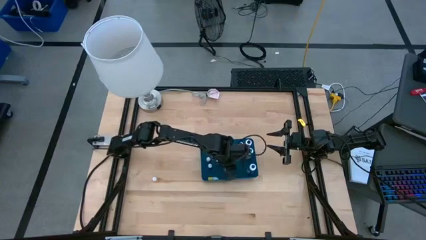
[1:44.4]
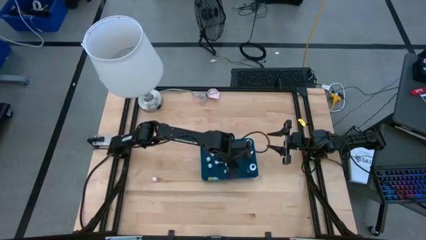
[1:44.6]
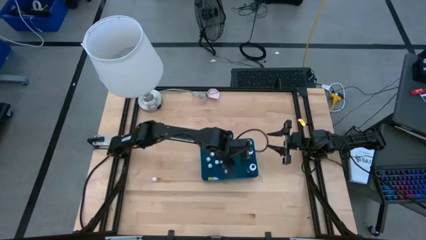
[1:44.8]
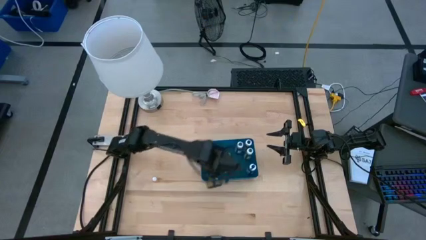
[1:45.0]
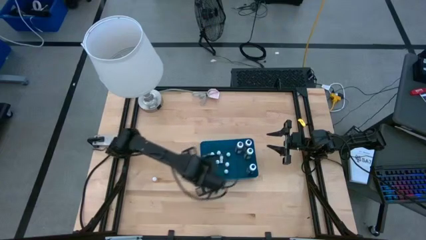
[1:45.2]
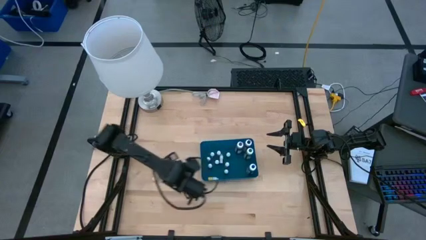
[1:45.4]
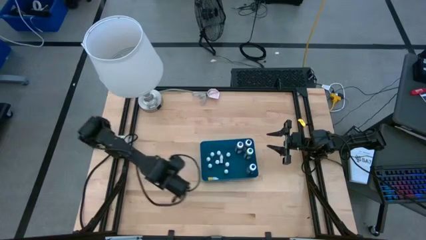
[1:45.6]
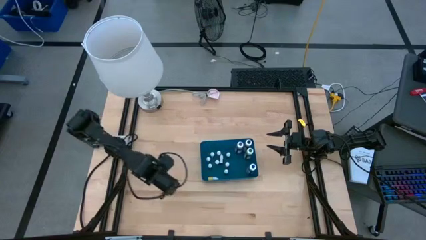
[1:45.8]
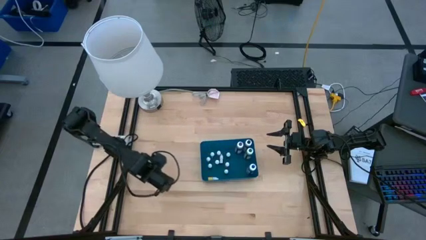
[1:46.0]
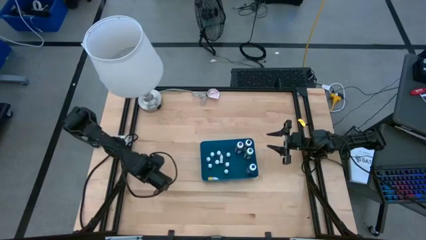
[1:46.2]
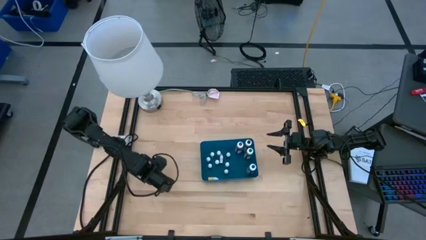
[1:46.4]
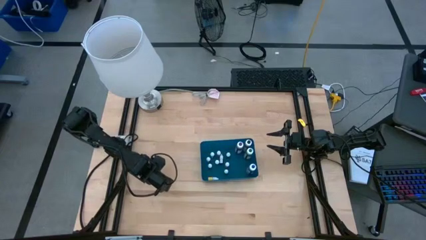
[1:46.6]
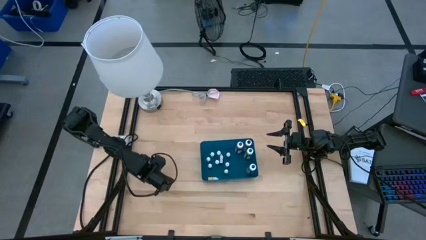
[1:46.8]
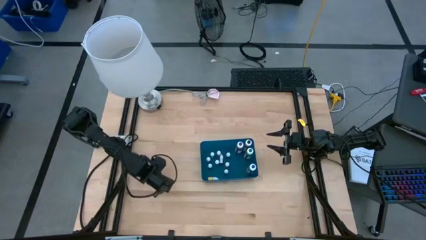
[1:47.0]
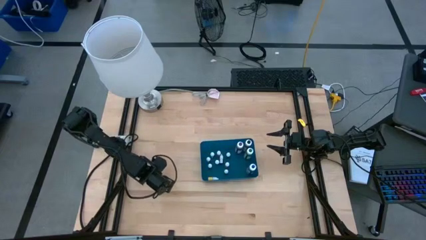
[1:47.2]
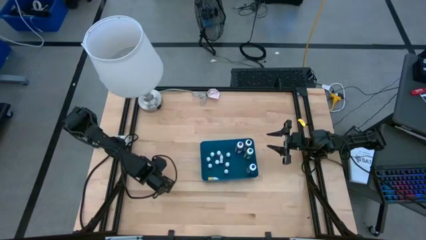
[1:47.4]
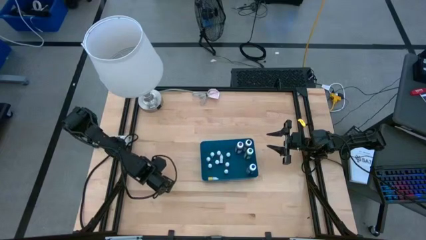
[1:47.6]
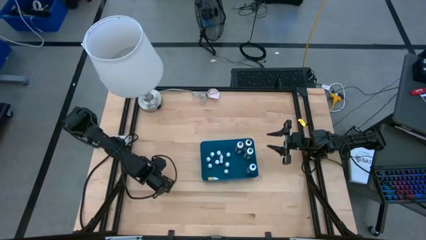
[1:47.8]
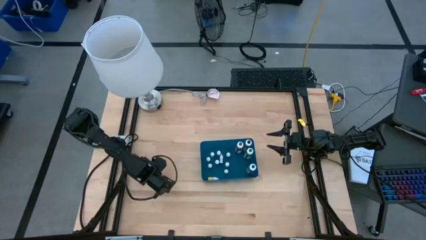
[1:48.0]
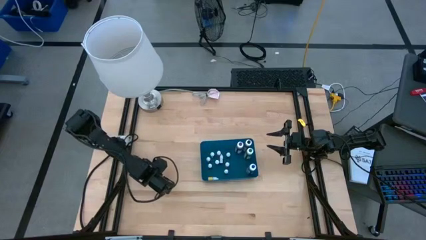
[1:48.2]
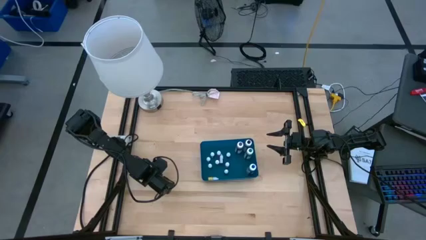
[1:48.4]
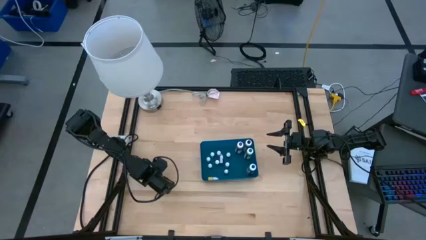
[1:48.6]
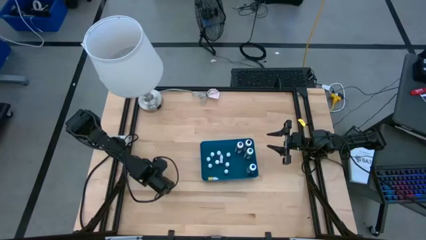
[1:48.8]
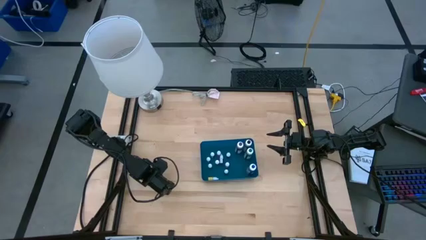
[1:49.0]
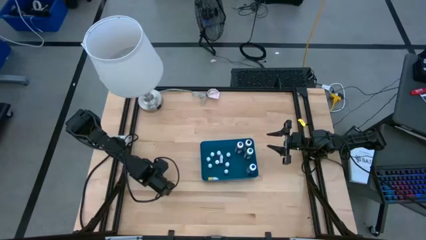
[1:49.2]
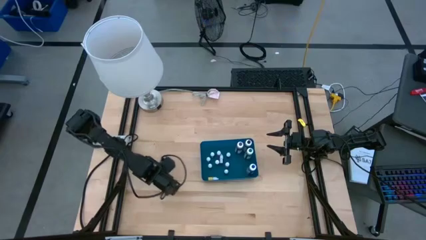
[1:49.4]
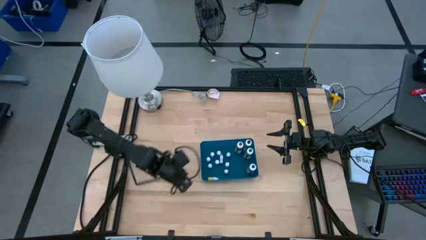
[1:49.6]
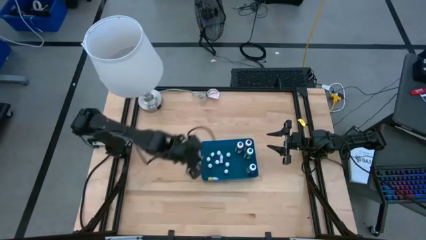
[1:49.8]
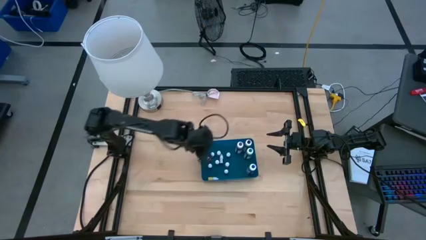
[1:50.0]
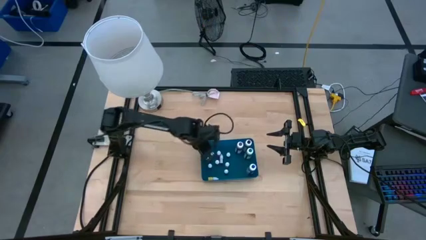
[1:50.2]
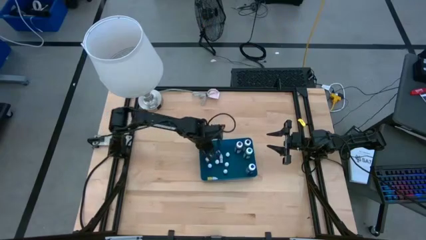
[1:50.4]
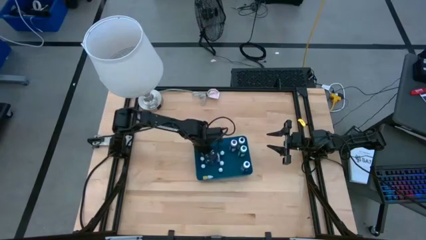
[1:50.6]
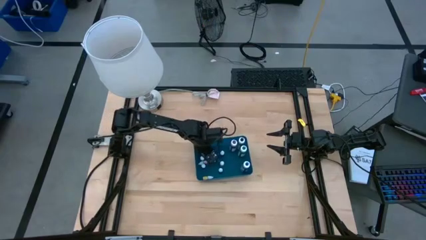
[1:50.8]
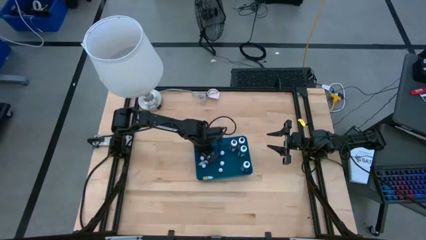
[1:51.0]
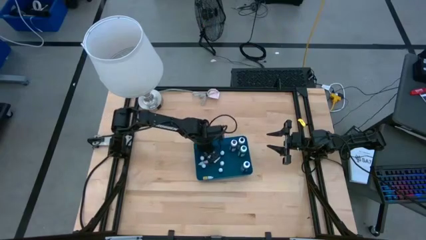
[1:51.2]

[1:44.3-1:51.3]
Task: Pick & Place food coloring
Put the small orange food coloring bottle into the blue bin

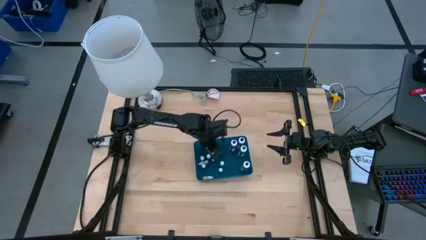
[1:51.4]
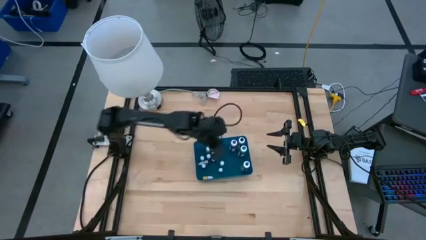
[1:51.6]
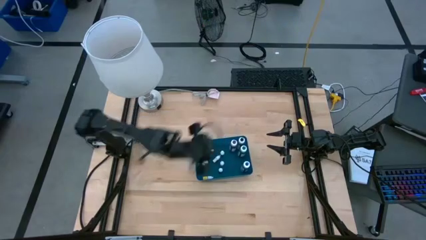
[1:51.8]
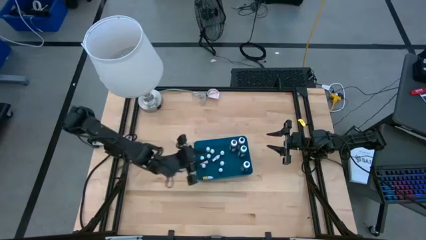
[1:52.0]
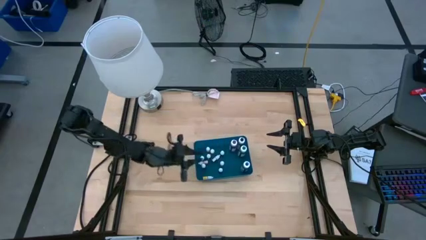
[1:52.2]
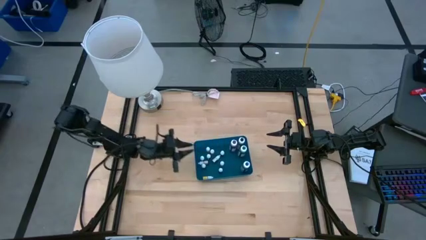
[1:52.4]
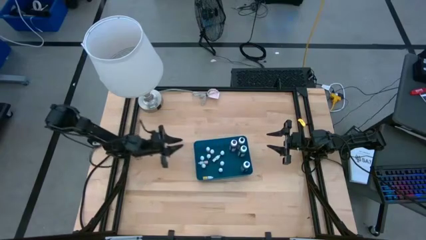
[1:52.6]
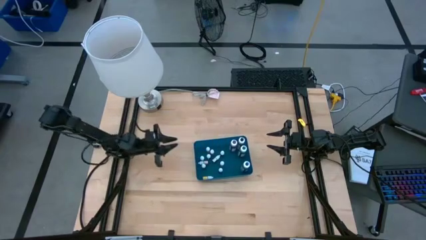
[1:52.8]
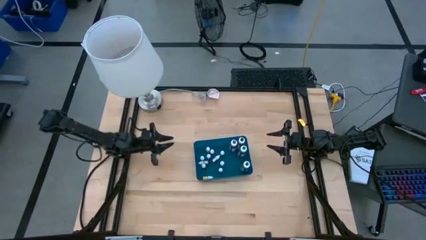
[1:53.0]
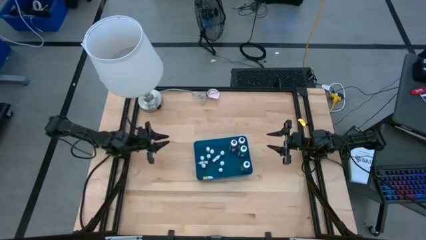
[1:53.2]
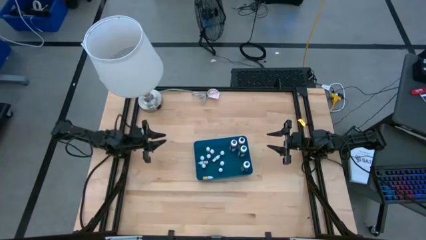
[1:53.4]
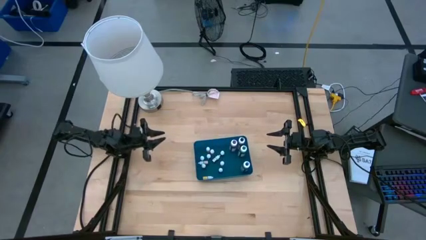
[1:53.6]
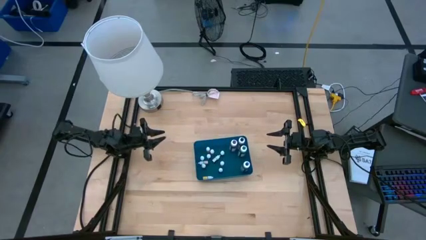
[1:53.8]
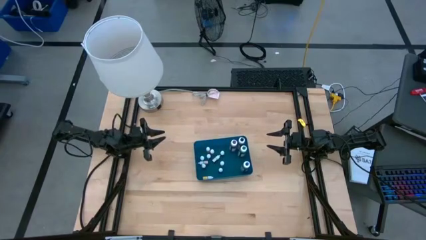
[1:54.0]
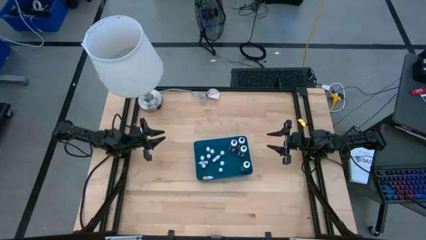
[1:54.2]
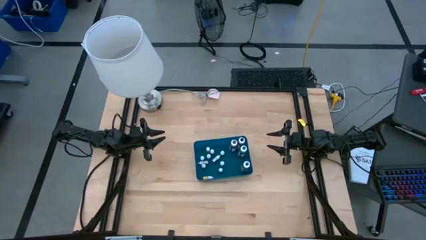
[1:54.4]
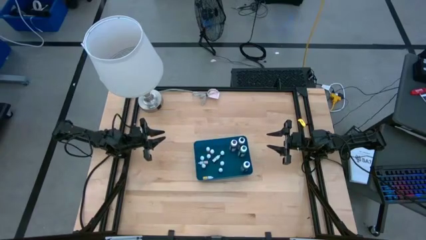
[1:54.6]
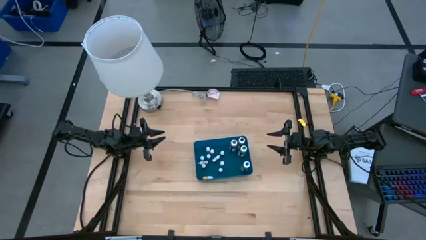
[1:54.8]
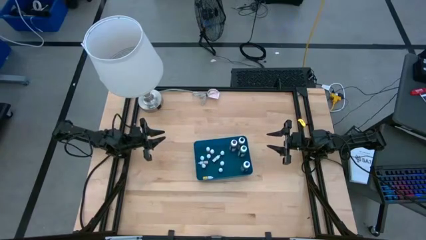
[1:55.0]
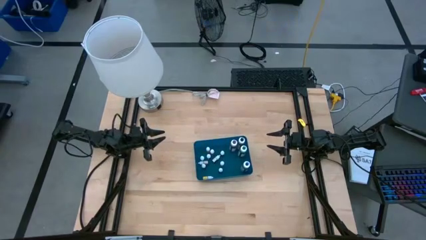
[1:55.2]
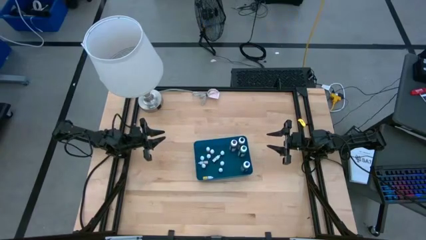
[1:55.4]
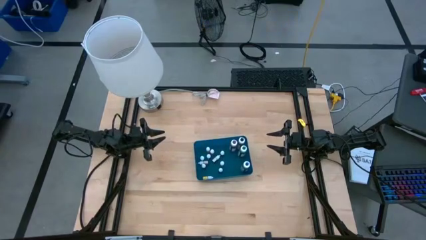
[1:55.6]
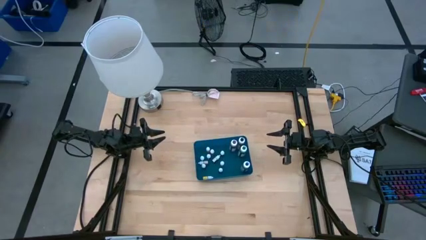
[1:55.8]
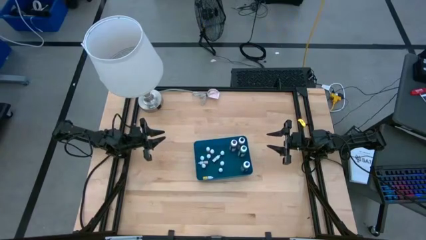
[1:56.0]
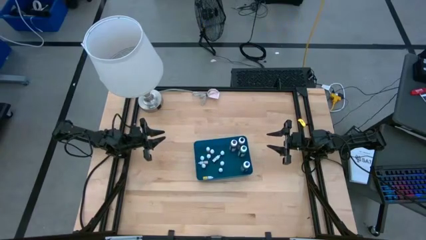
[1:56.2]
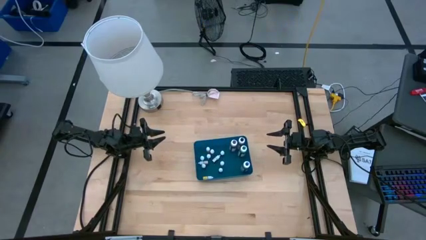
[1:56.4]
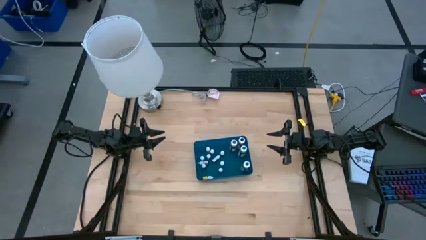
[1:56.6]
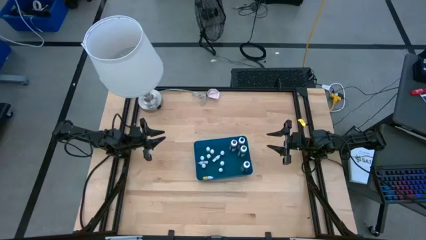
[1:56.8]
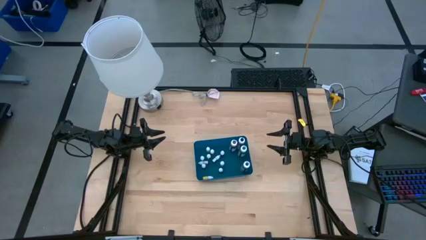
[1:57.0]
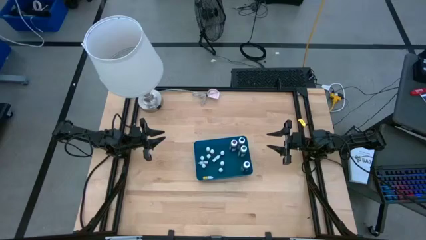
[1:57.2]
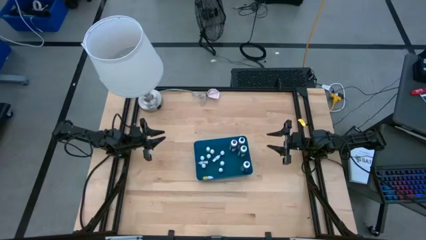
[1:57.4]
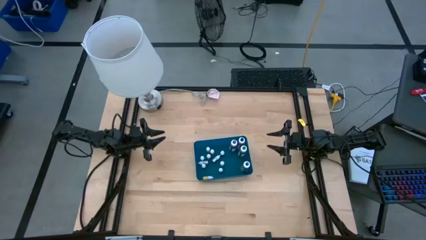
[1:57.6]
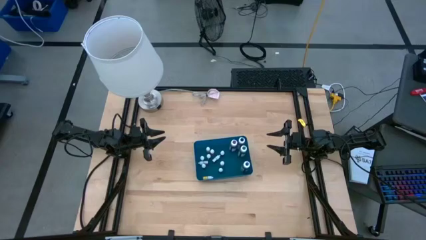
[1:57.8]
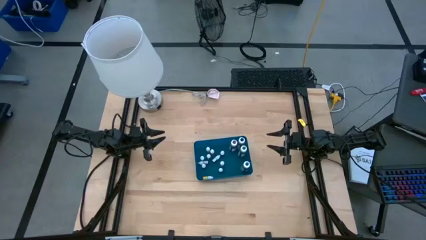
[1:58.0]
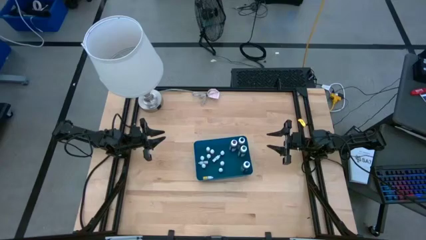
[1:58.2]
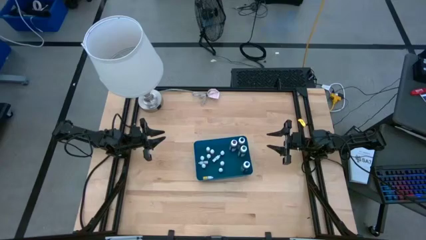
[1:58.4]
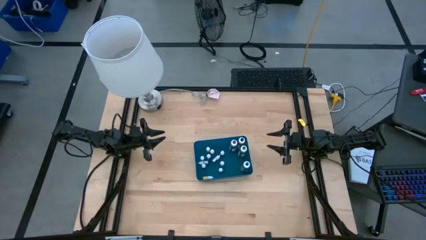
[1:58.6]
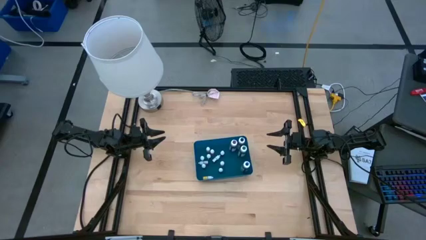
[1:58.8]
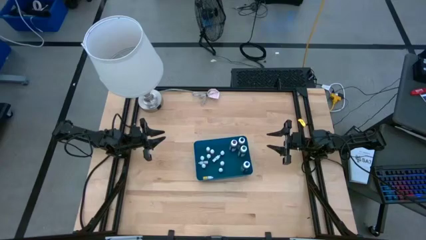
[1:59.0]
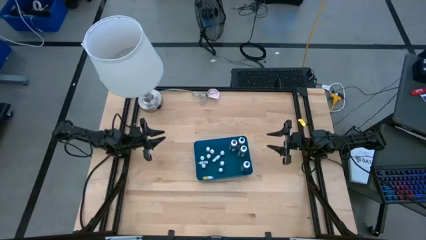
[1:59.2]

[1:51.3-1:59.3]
Return to Home Position
